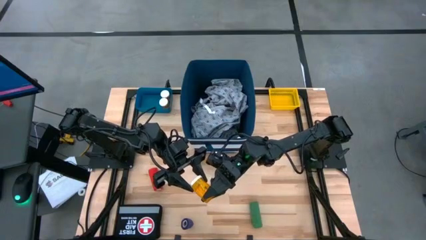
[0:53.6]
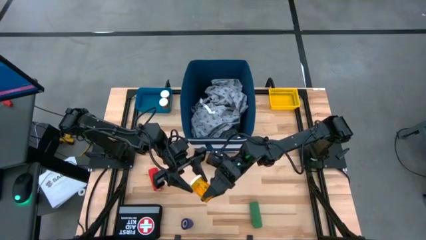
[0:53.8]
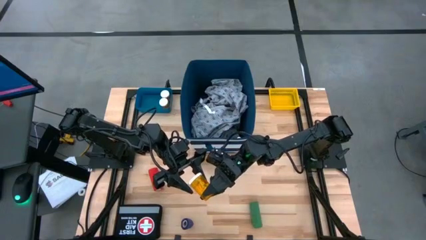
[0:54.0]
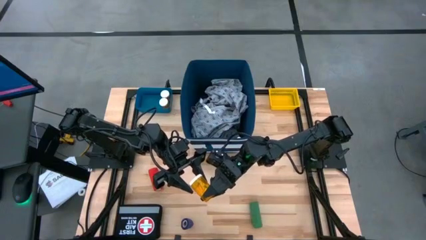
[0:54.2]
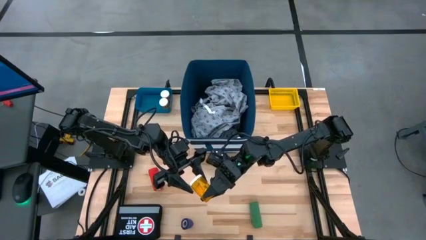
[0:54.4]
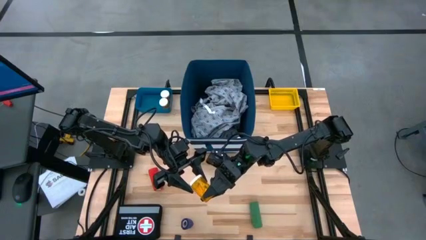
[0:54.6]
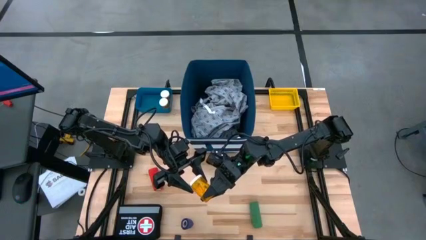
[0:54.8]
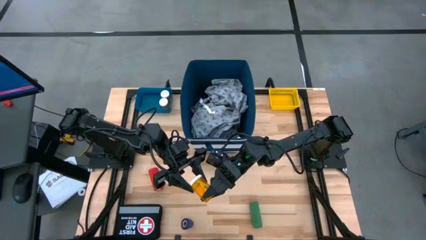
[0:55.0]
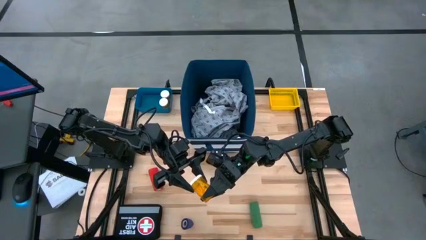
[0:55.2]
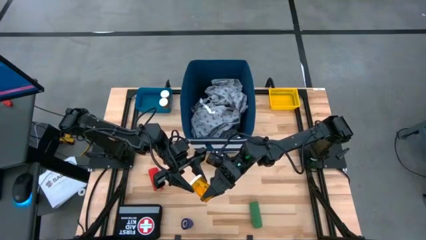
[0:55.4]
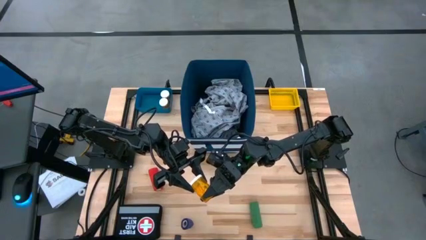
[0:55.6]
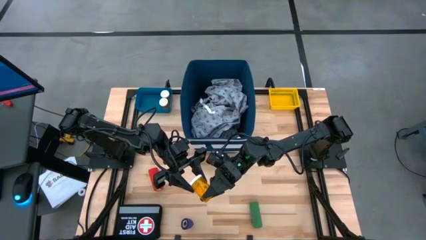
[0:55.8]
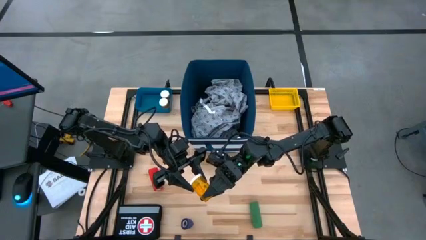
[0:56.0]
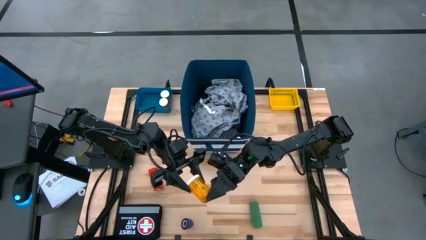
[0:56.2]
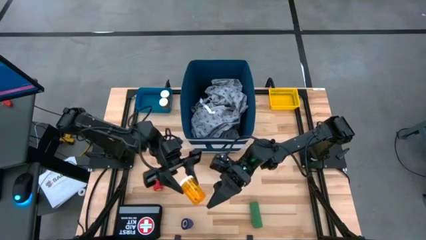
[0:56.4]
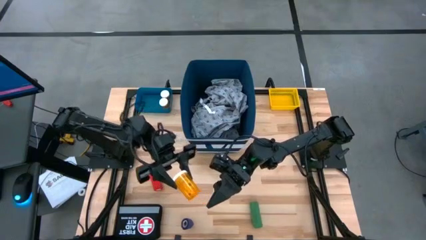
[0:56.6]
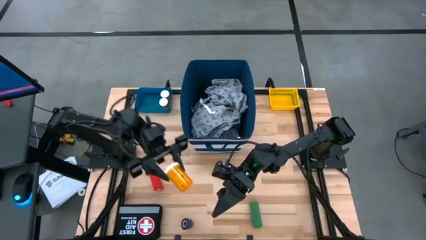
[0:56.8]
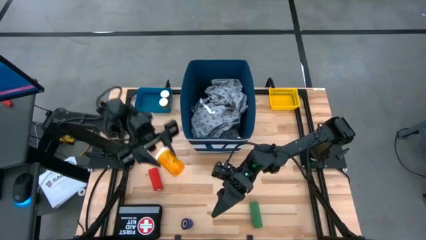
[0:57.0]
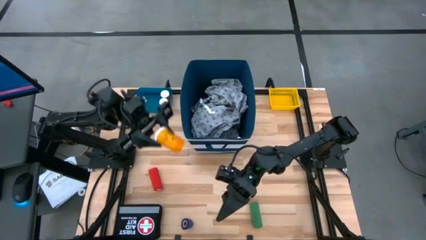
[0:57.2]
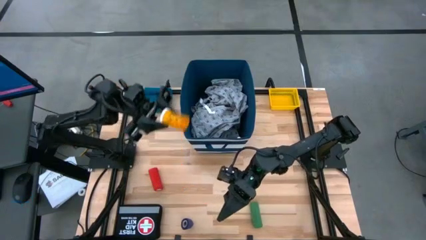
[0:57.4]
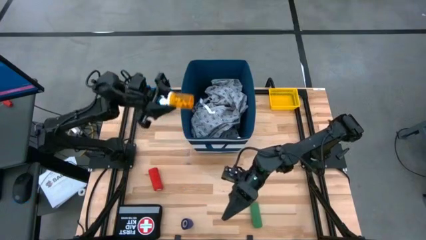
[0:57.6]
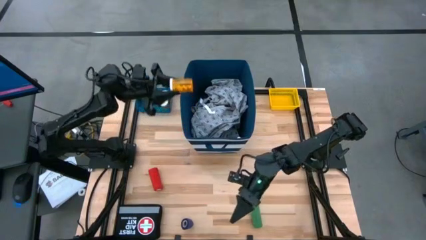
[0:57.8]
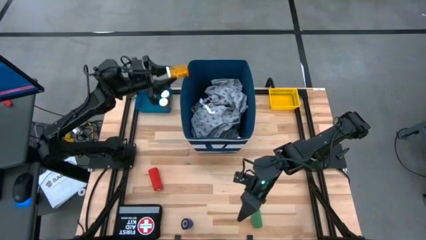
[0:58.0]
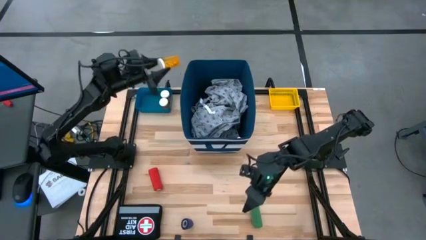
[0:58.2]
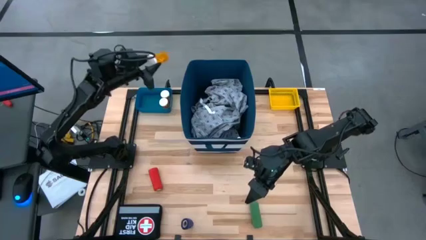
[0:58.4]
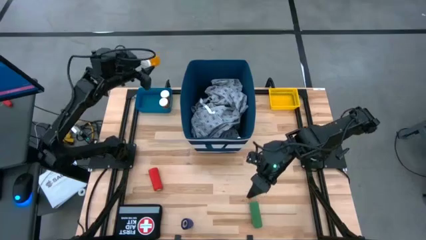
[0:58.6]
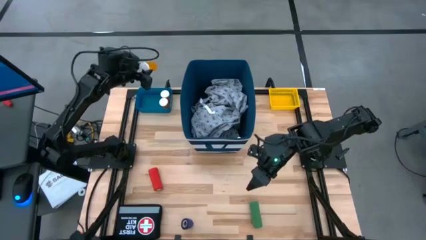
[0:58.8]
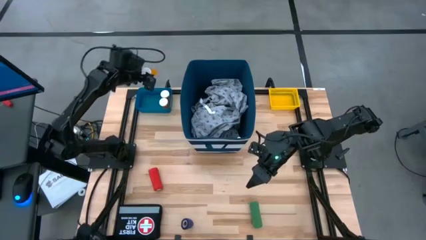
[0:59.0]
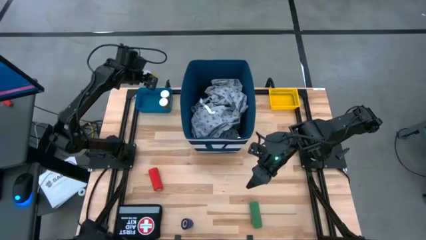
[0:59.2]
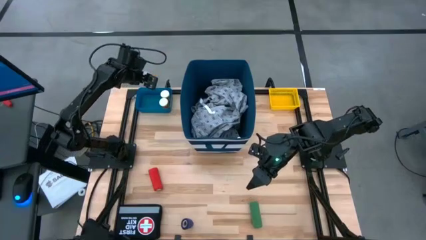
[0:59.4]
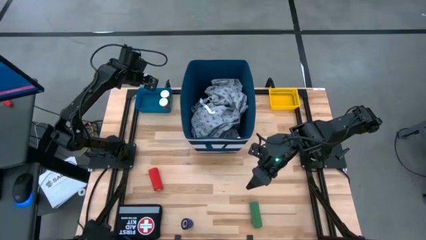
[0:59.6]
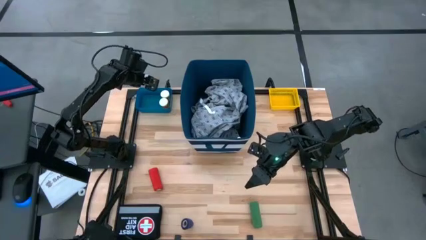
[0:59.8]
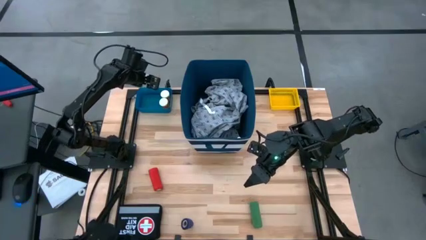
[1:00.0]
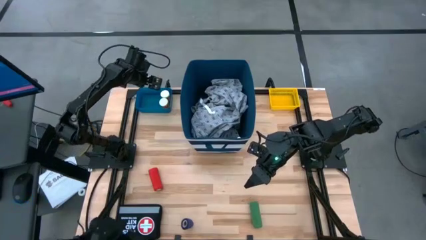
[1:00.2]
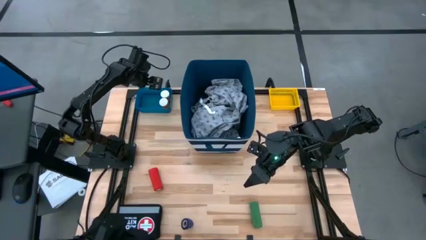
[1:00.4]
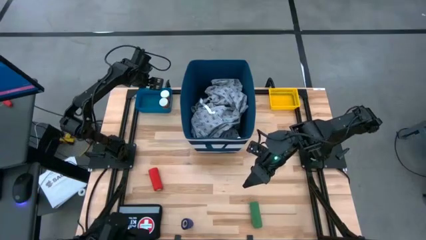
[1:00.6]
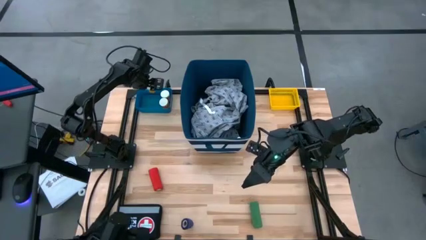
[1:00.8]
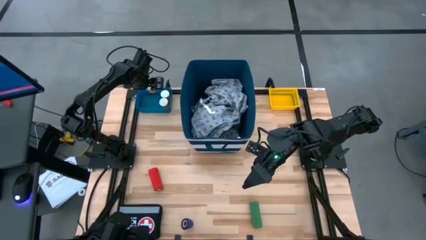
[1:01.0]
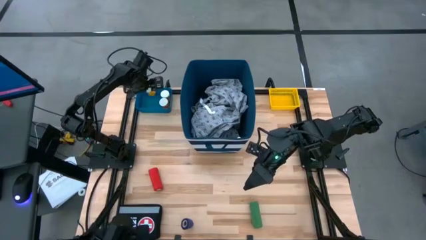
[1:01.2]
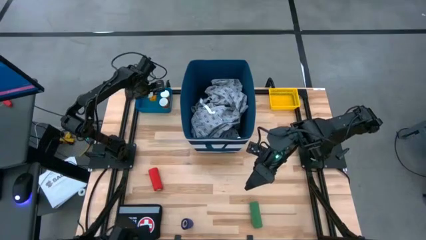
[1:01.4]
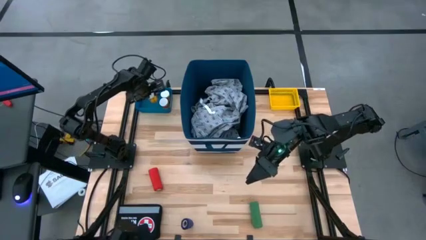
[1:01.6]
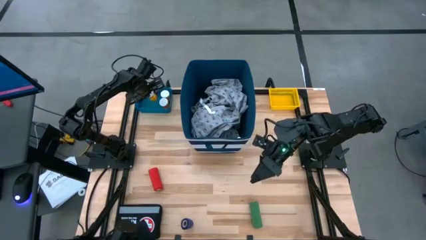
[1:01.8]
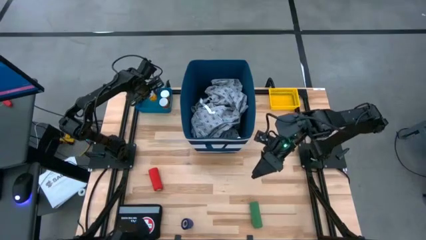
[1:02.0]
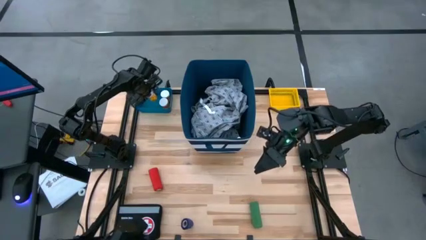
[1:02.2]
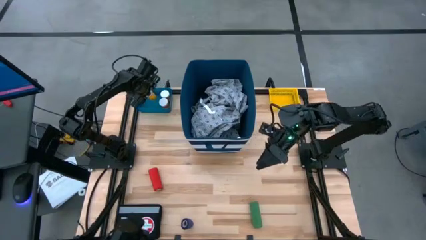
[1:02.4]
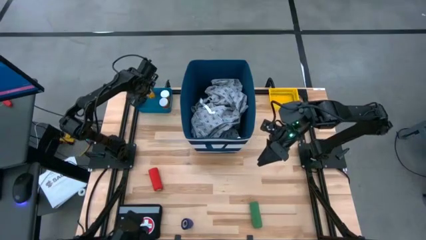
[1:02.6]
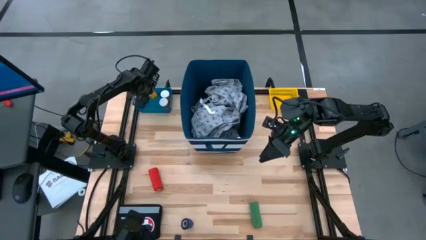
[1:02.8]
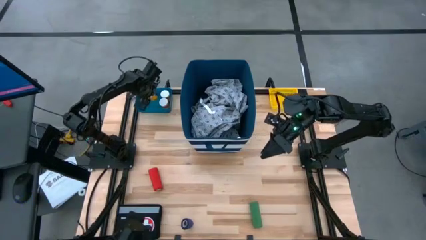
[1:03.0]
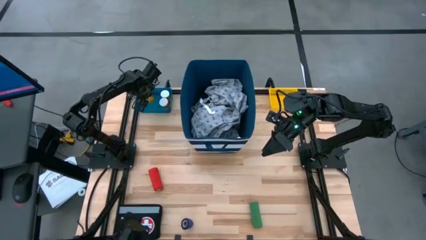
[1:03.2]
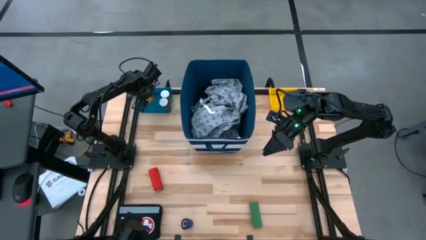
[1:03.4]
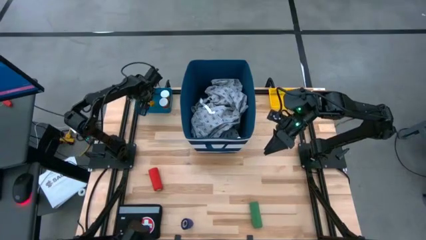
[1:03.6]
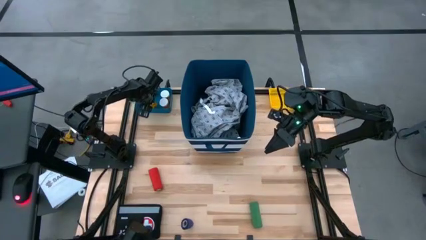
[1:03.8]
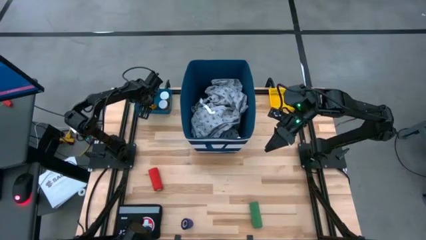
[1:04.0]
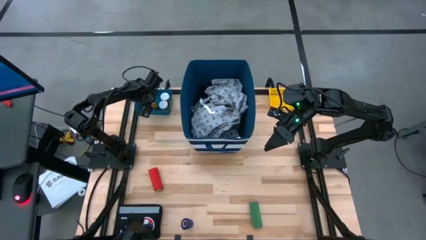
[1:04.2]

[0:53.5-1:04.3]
Task: Pick & place medical supplies in basket/bin
Put the orange pill bottle into the blue bin
